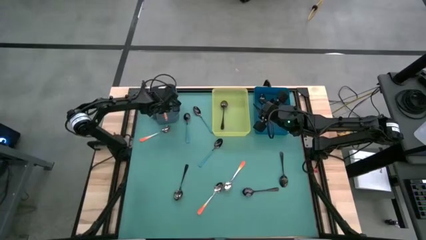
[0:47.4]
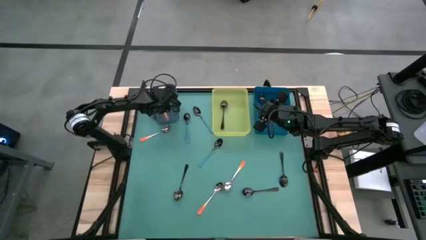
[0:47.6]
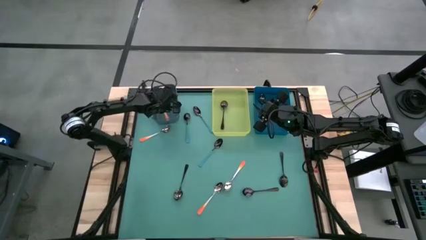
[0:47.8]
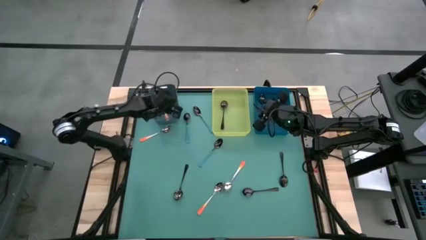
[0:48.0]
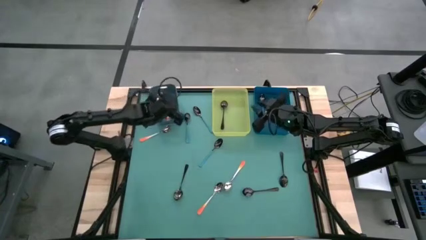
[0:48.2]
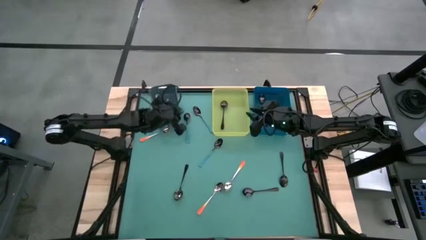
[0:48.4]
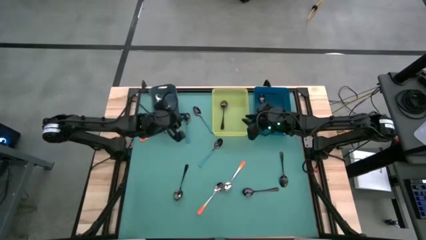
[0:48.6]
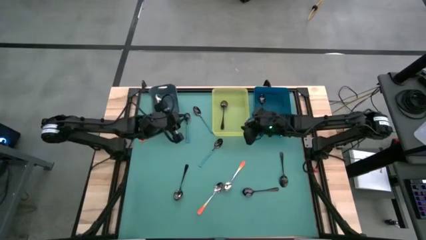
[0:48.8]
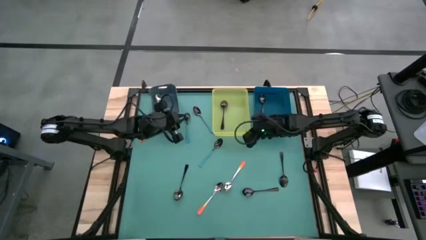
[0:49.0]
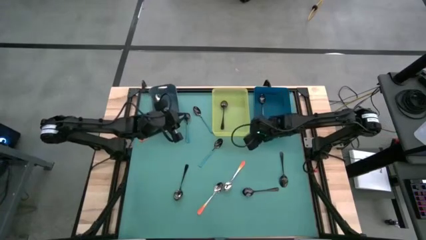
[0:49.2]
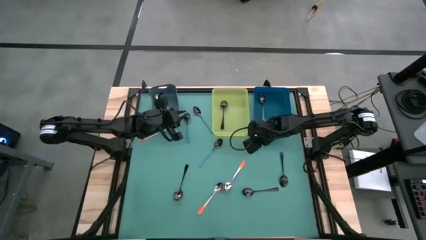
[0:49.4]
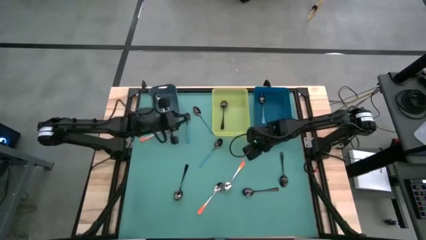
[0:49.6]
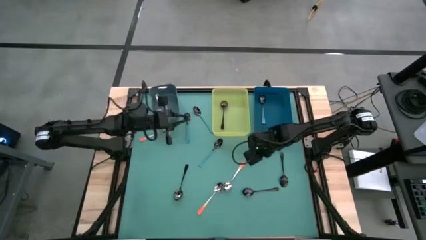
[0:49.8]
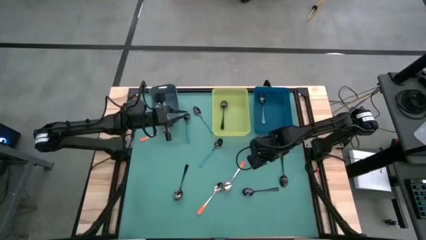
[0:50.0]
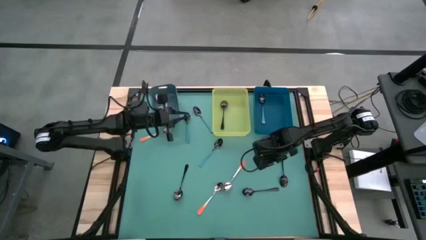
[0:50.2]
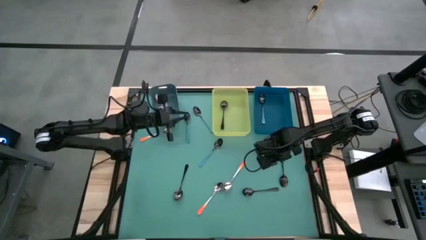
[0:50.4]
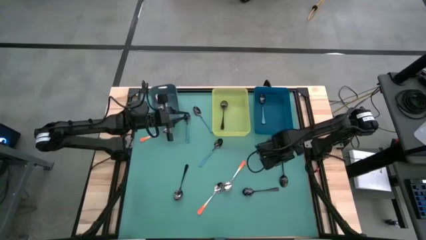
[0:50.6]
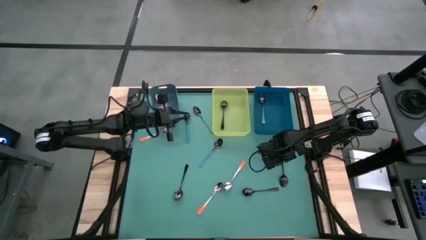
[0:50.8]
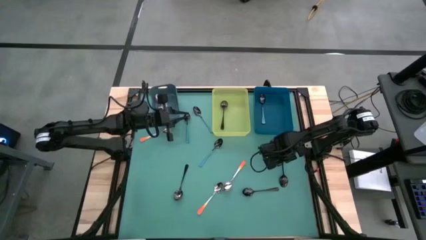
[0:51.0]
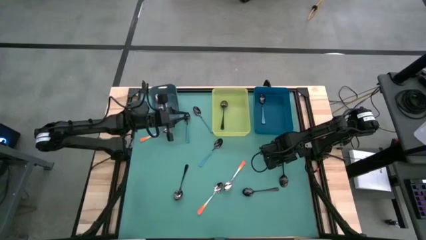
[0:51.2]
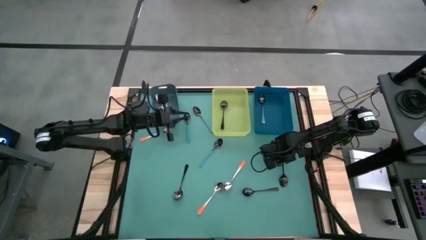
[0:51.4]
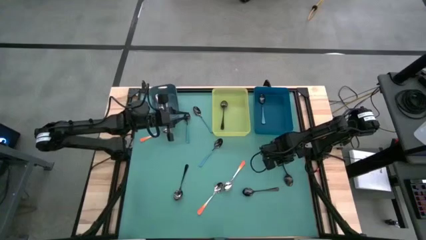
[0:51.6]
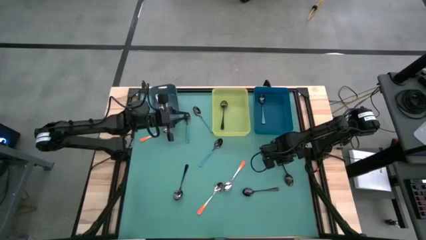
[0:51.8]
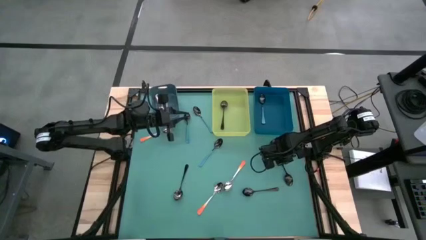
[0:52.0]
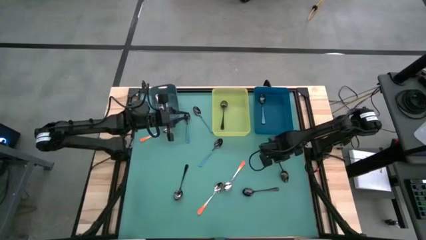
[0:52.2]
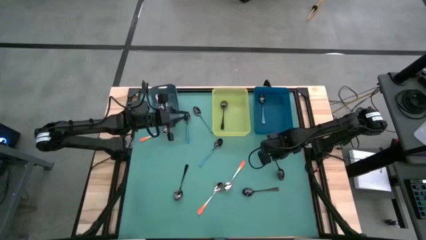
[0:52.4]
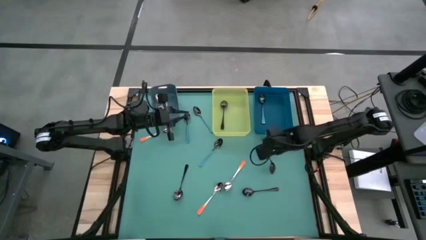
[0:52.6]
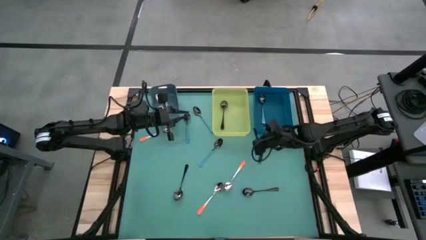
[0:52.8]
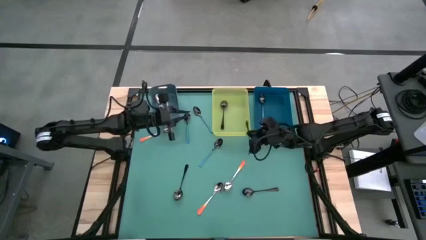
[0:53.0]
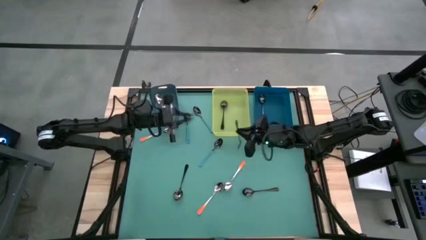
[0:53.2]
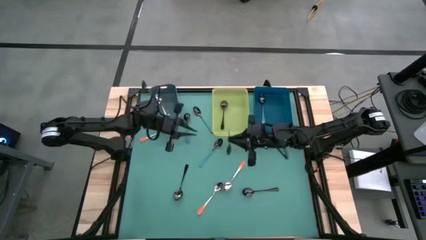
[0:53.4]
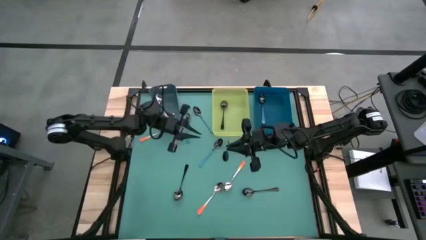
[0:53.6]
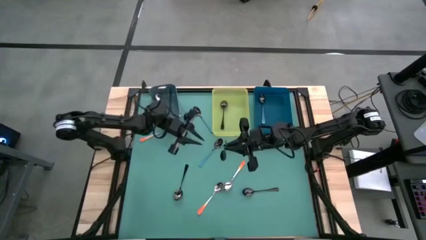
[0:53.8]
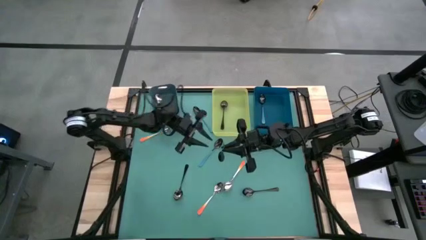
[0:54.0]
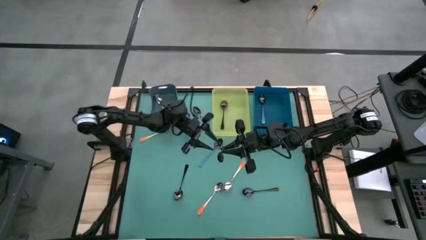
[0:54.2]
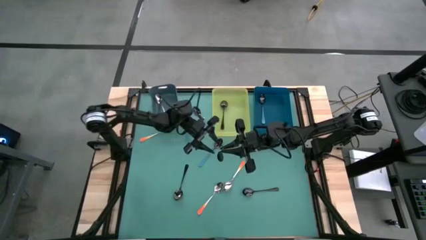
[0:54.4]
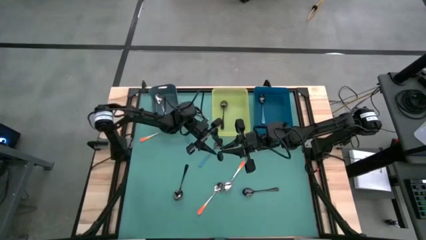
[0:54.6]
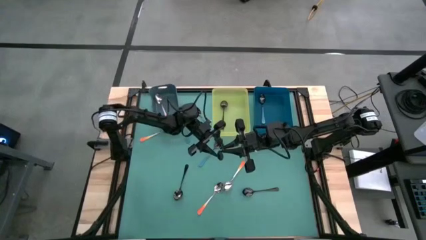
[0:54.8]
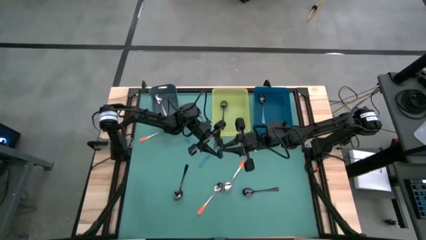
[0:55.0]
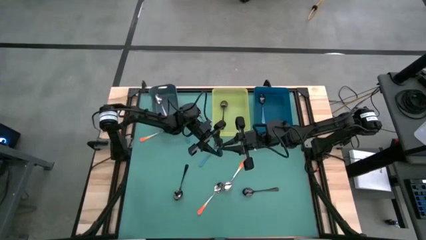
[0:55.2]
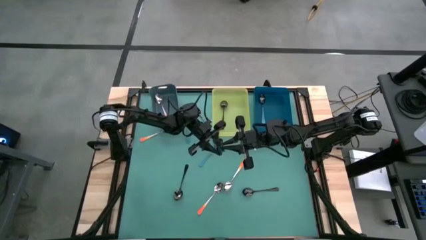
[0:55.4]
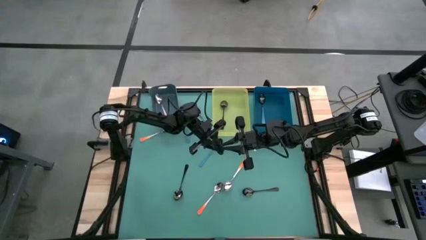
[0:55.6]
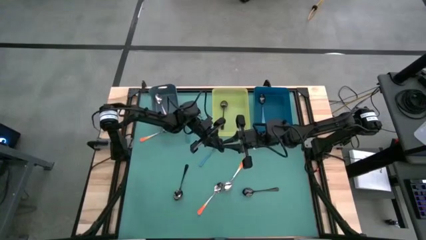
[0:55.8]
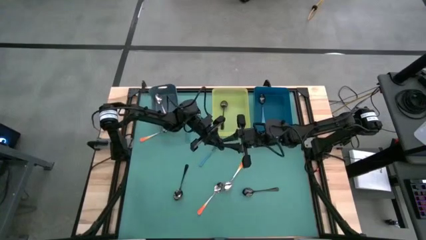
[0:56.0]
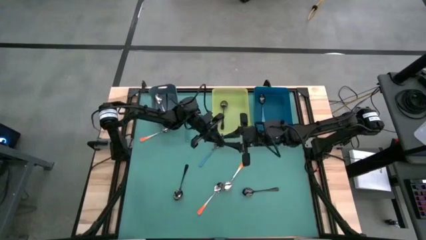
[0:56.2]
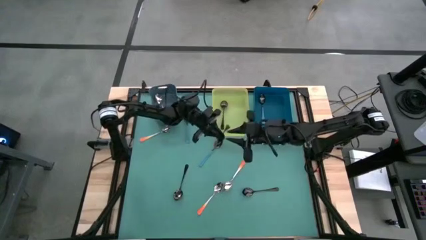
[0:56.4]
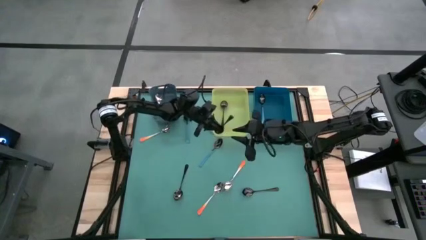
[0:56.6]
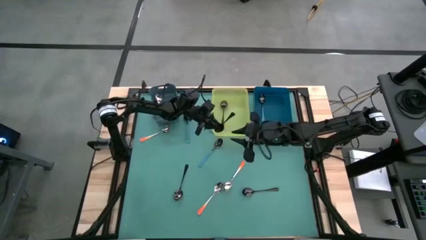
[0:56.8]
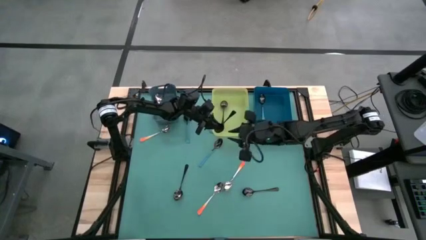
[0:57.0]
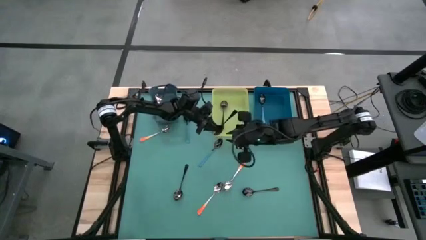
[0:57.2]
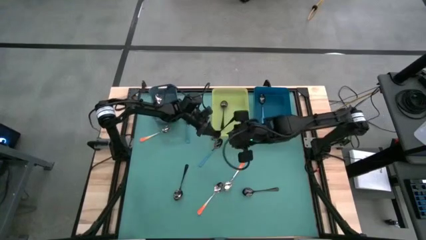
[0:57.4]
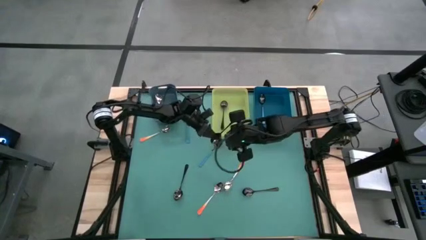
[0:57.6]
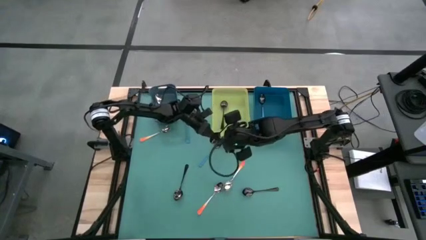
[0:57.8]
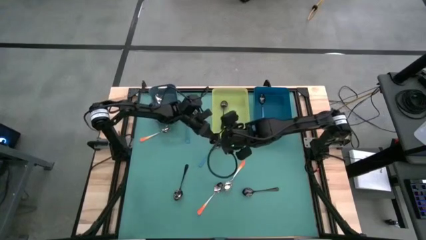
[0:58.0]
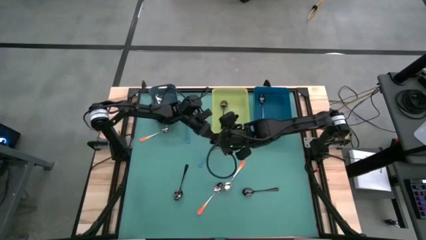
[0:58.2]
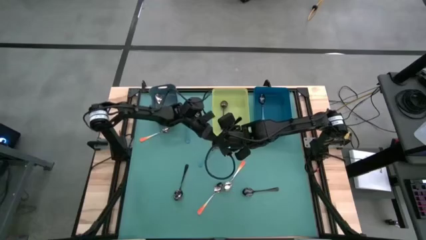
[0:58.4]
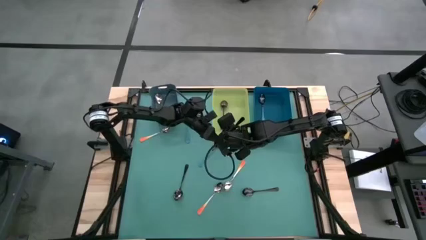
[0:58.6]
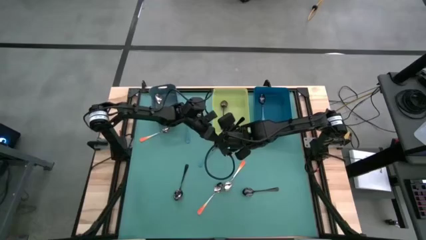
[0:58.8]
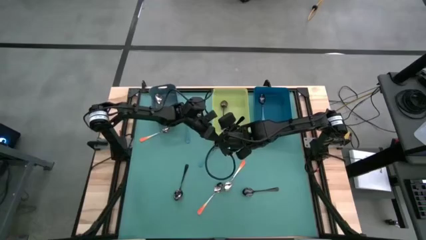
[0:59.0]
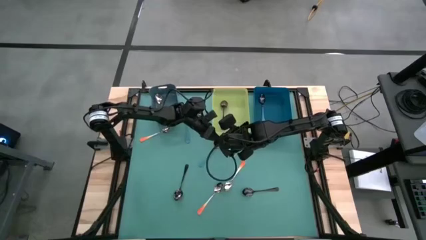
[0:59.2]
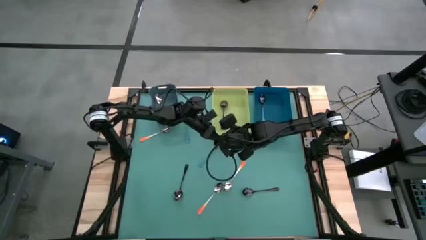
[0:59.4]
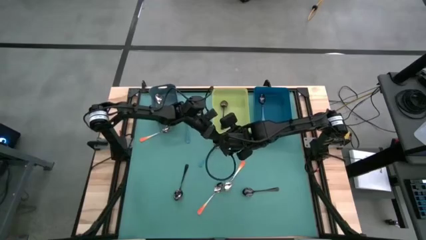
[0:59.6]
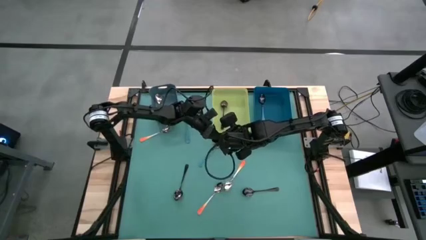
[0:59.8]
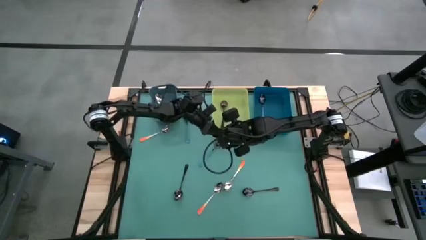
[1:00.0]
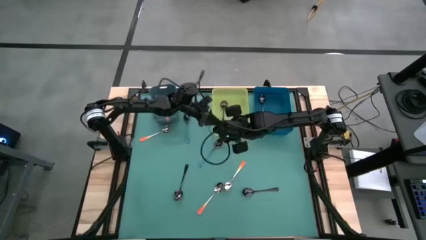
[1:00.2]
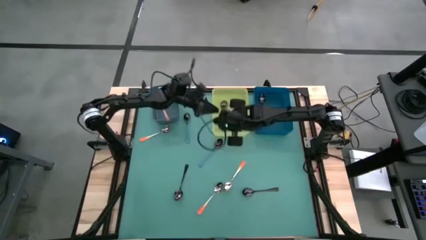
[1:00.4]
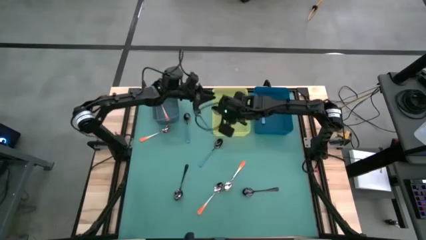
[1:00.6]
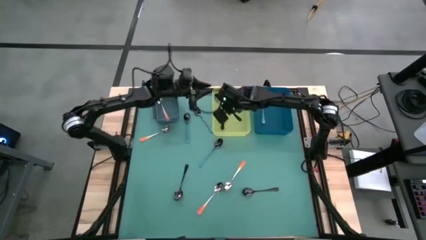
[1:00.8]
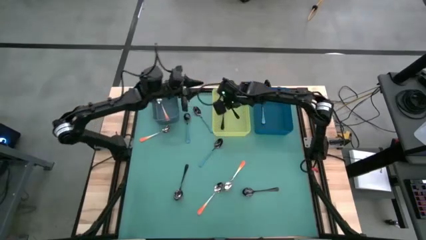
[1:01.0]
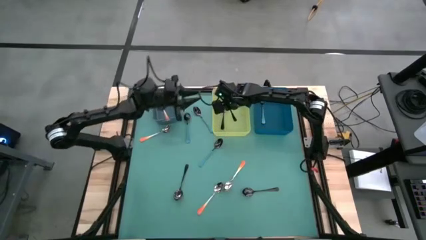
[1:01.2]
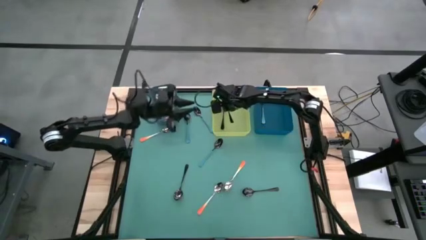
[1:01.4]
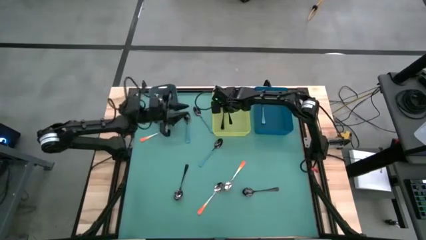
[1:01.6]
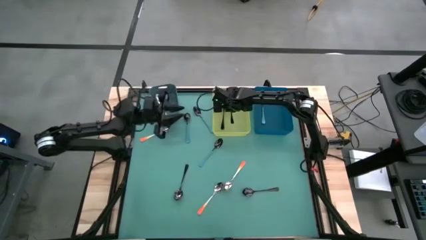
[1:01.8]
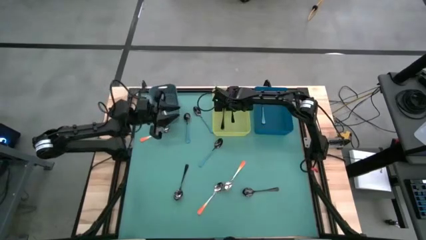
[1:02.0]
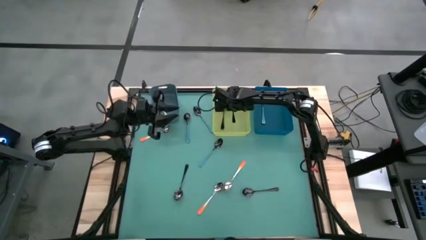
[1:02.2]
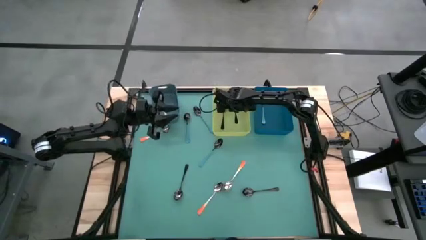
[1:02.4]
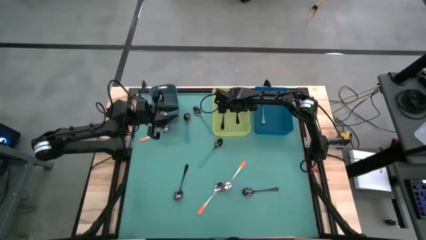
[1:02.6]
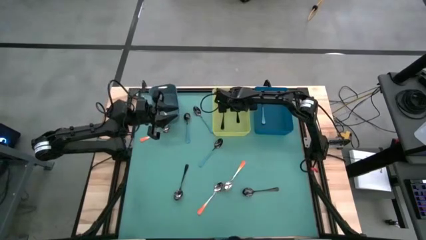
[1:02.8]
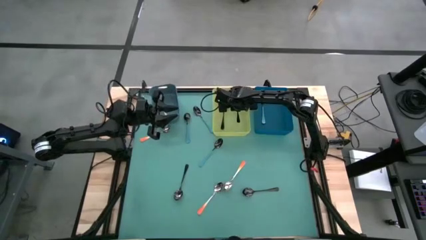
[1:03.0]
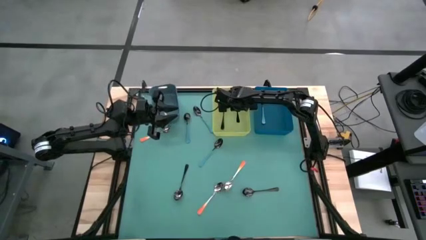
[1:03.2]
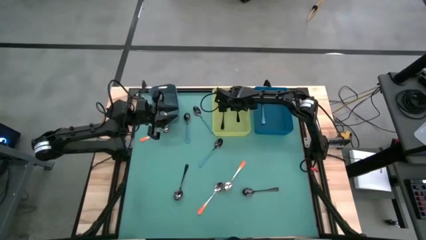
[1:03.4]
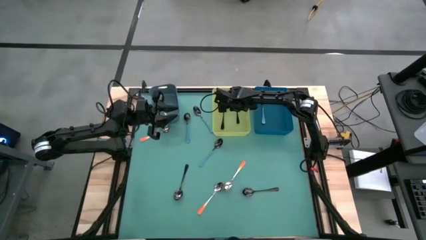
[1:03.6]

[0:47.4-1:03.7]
Task: Sort silverware by color (type)
Put the black spoon into the yellow bin
